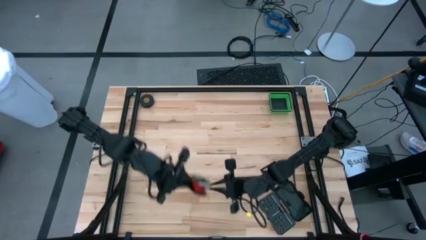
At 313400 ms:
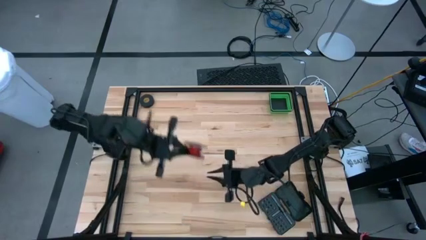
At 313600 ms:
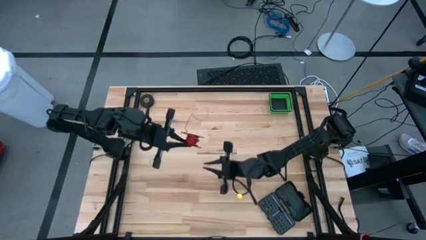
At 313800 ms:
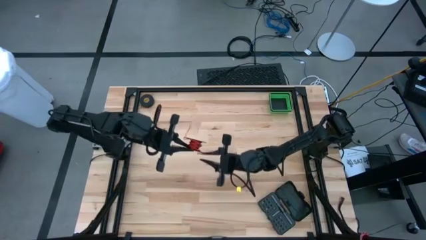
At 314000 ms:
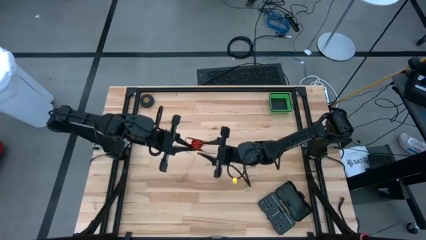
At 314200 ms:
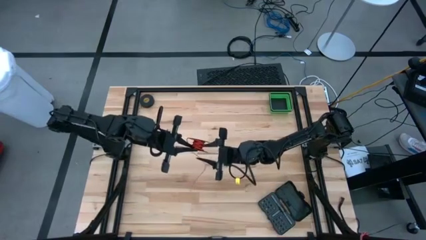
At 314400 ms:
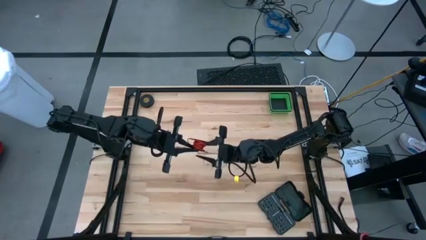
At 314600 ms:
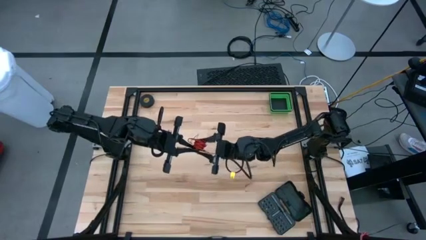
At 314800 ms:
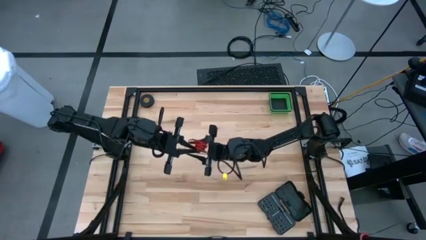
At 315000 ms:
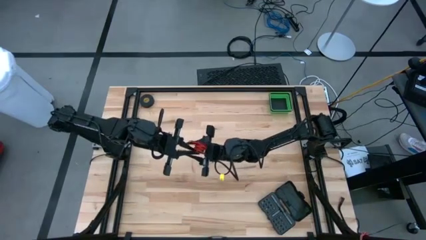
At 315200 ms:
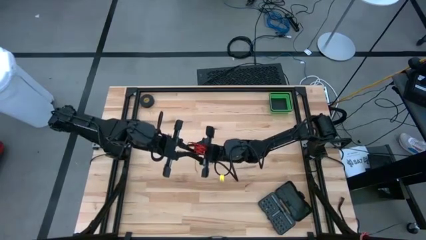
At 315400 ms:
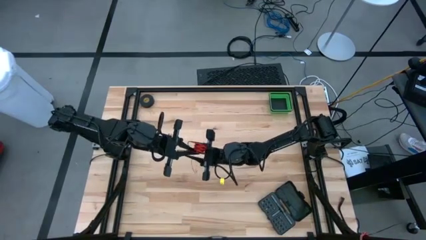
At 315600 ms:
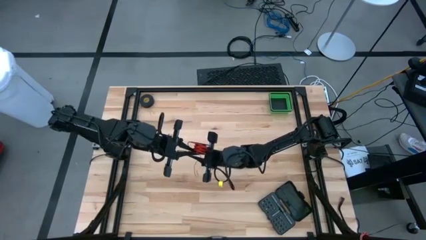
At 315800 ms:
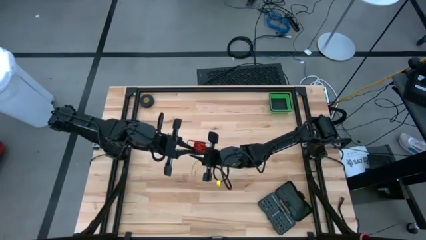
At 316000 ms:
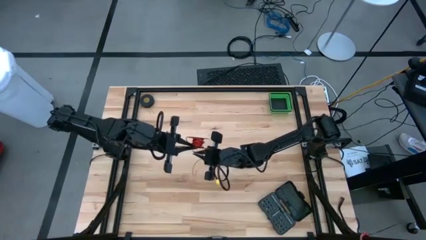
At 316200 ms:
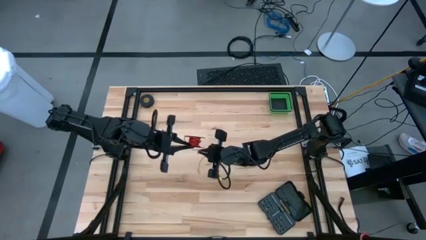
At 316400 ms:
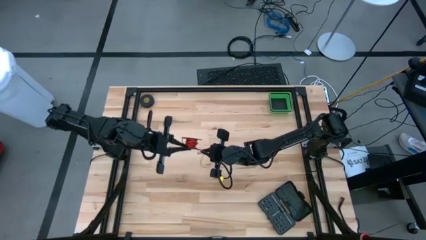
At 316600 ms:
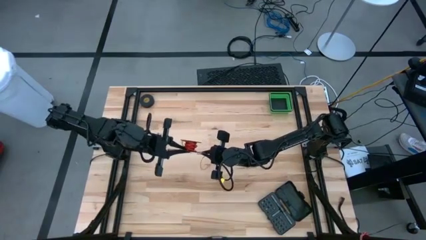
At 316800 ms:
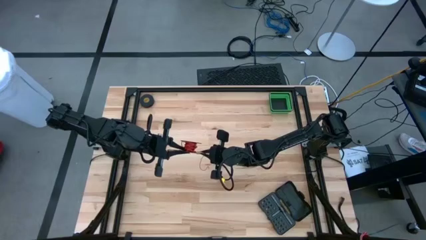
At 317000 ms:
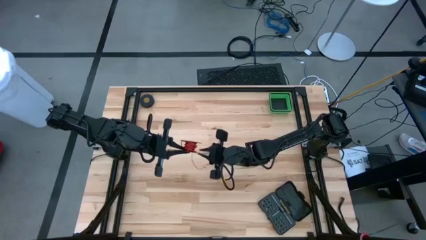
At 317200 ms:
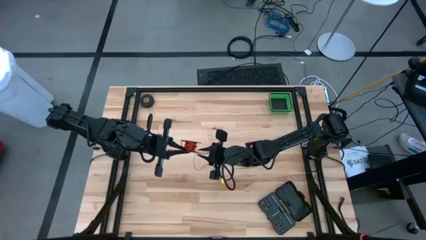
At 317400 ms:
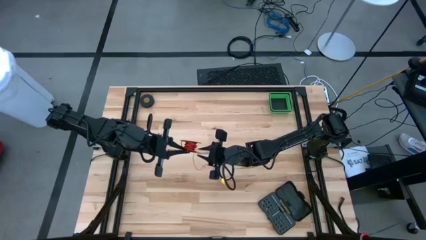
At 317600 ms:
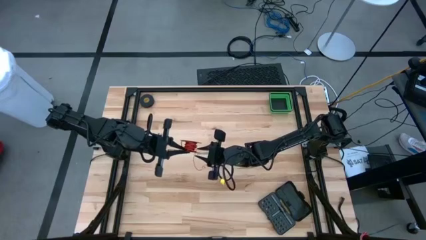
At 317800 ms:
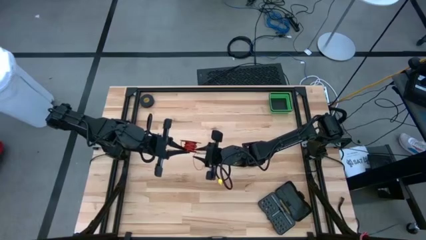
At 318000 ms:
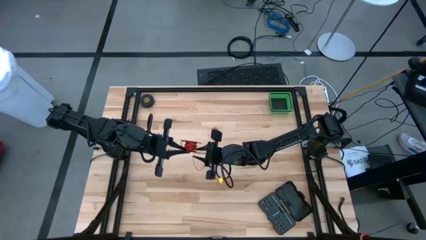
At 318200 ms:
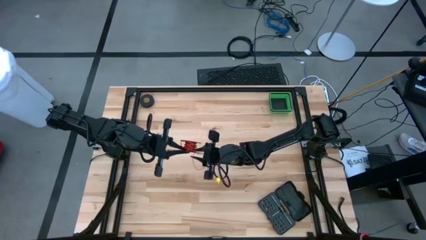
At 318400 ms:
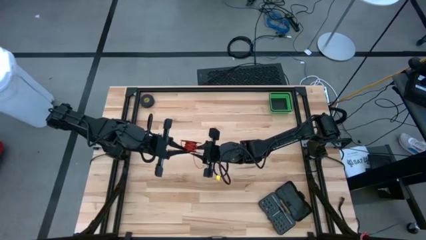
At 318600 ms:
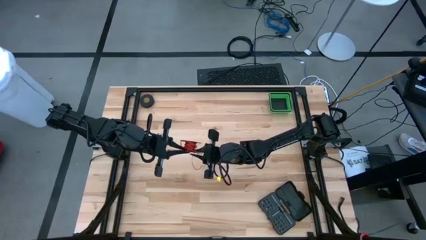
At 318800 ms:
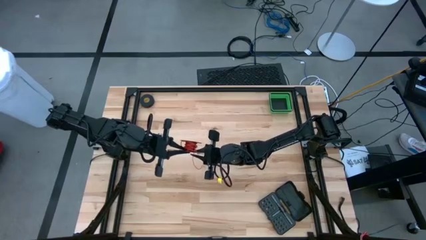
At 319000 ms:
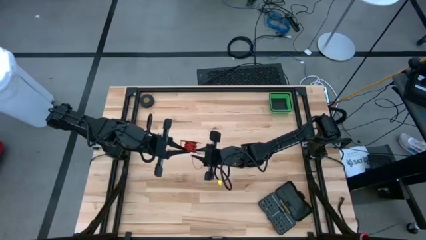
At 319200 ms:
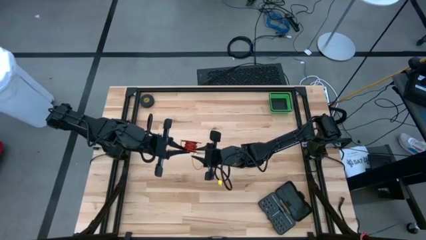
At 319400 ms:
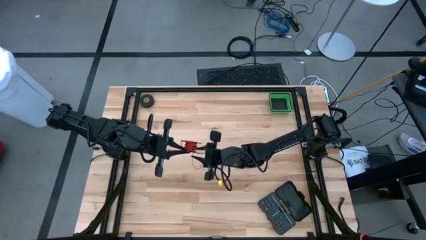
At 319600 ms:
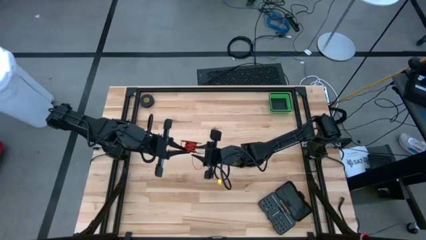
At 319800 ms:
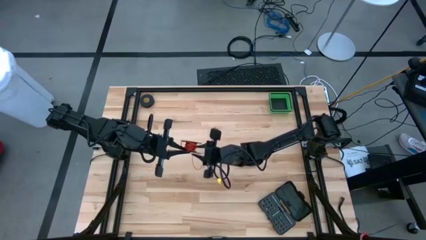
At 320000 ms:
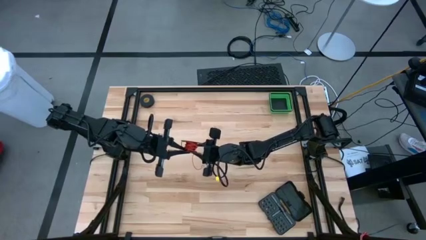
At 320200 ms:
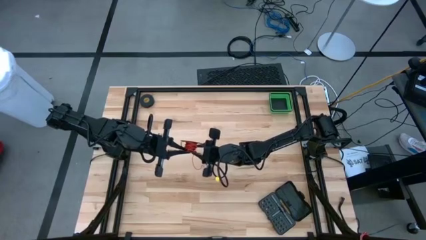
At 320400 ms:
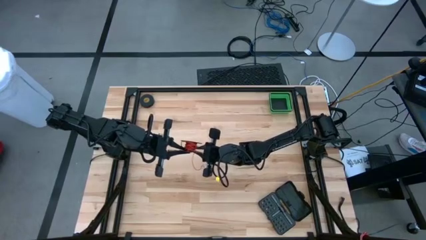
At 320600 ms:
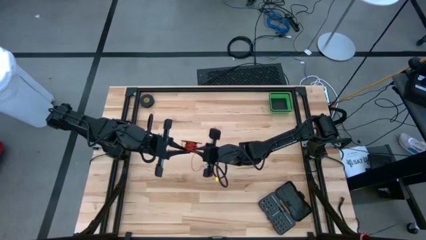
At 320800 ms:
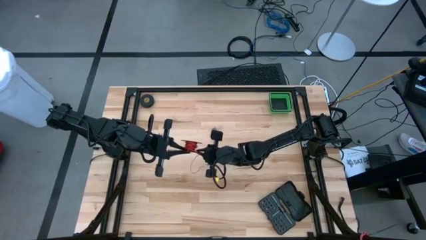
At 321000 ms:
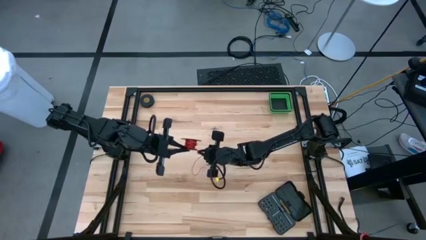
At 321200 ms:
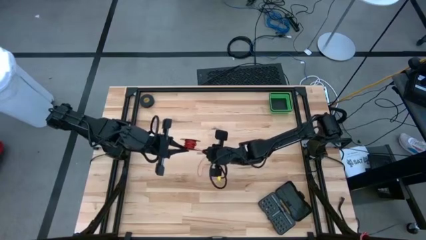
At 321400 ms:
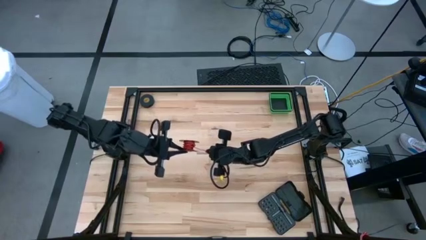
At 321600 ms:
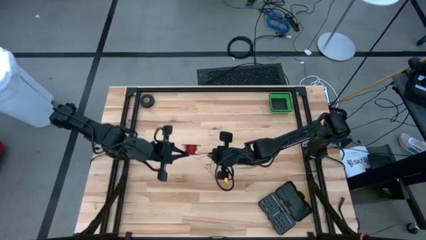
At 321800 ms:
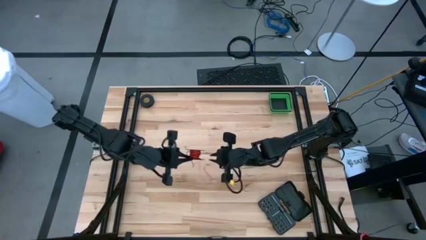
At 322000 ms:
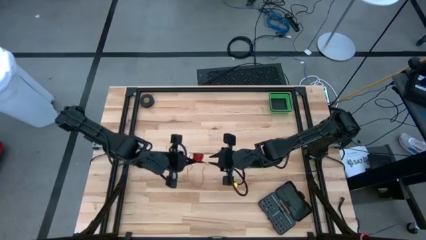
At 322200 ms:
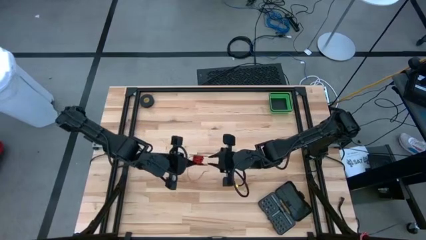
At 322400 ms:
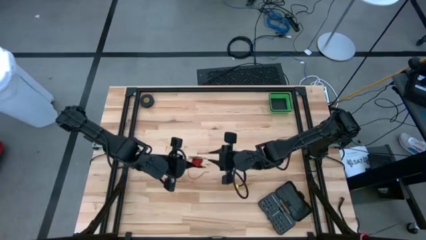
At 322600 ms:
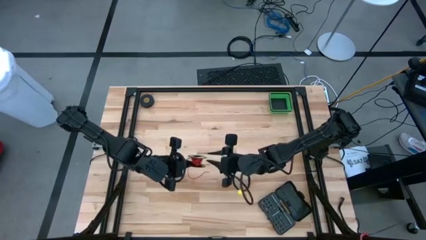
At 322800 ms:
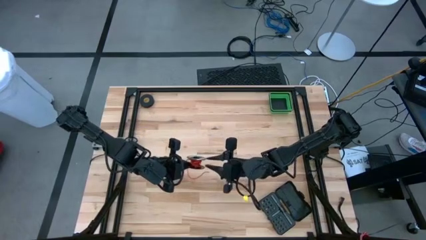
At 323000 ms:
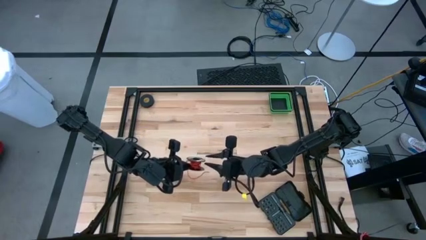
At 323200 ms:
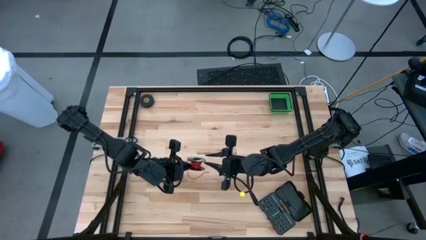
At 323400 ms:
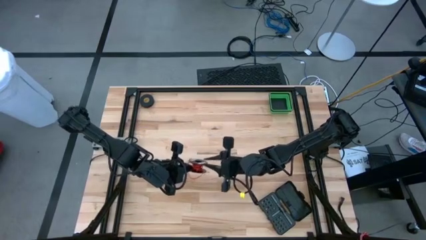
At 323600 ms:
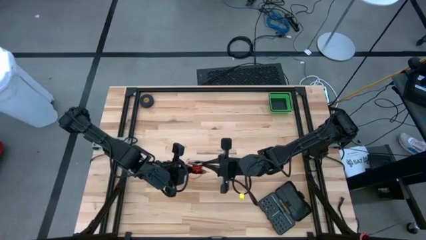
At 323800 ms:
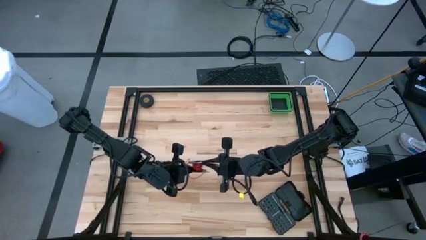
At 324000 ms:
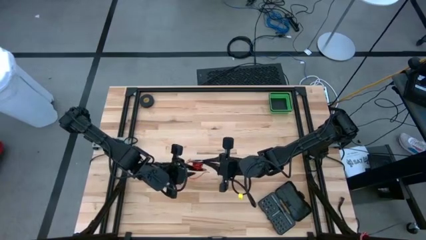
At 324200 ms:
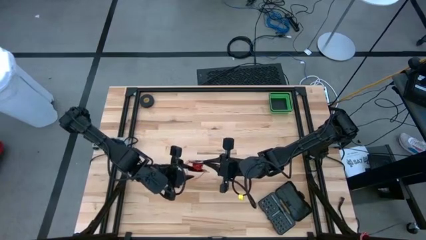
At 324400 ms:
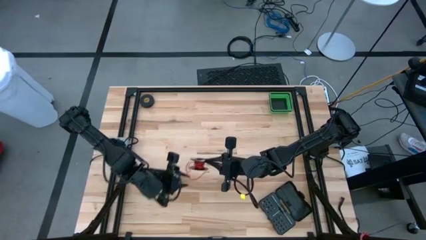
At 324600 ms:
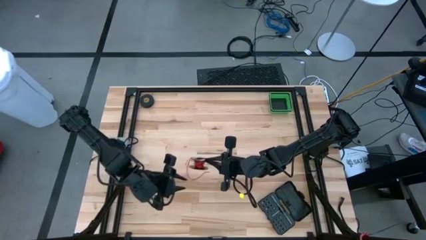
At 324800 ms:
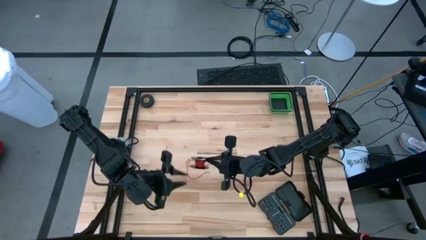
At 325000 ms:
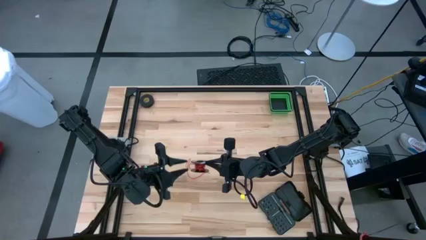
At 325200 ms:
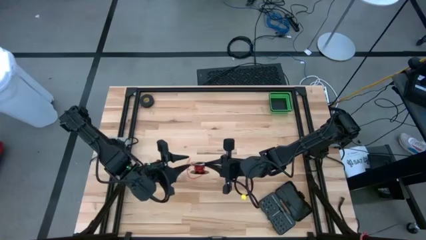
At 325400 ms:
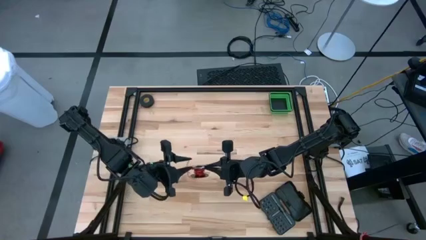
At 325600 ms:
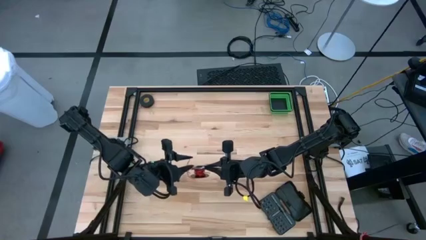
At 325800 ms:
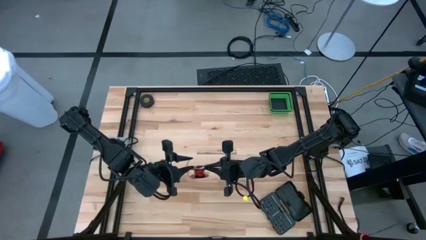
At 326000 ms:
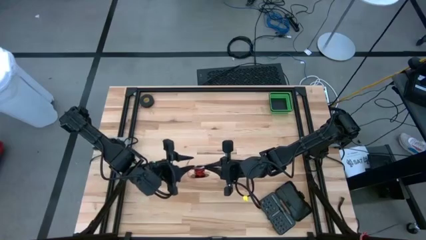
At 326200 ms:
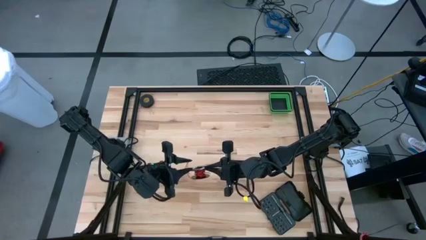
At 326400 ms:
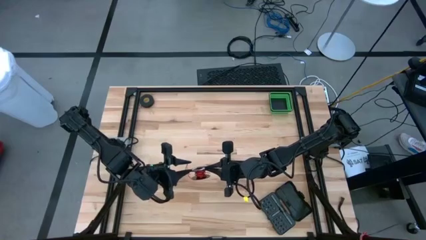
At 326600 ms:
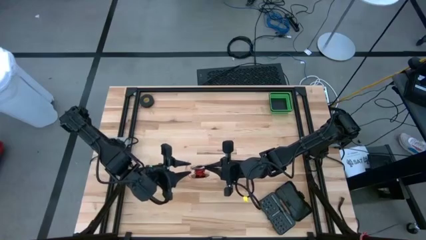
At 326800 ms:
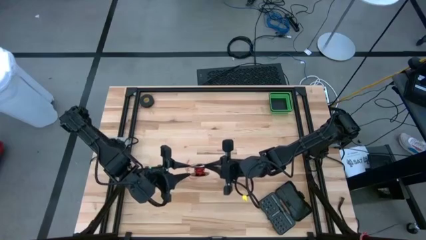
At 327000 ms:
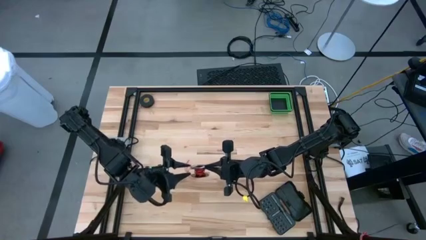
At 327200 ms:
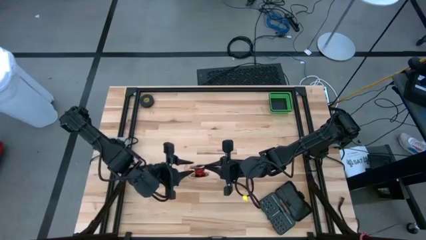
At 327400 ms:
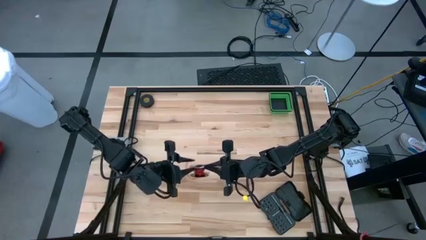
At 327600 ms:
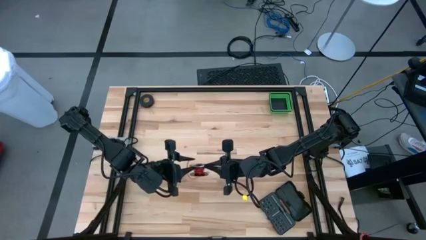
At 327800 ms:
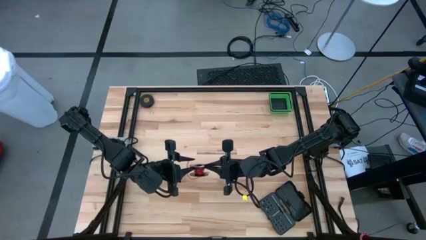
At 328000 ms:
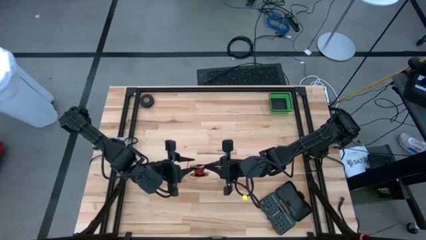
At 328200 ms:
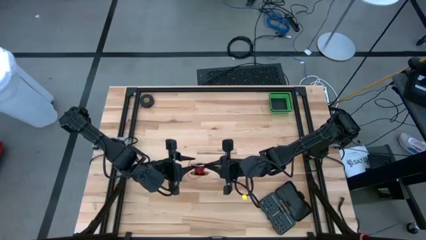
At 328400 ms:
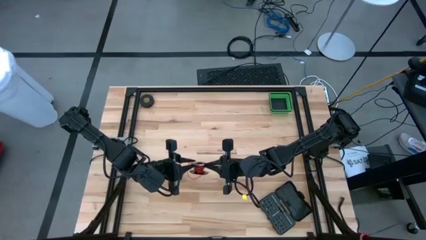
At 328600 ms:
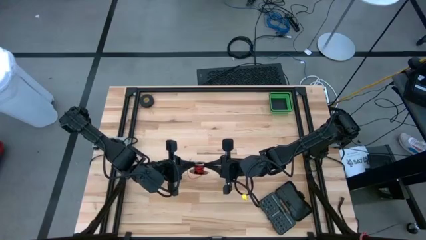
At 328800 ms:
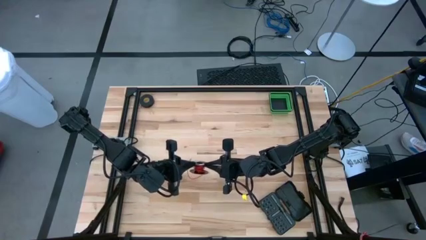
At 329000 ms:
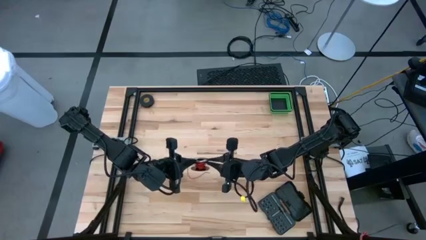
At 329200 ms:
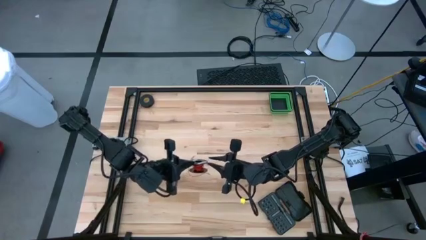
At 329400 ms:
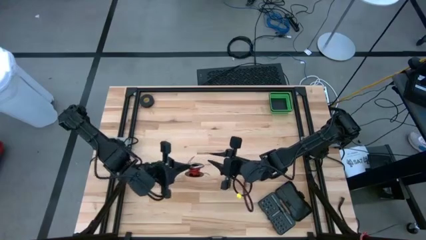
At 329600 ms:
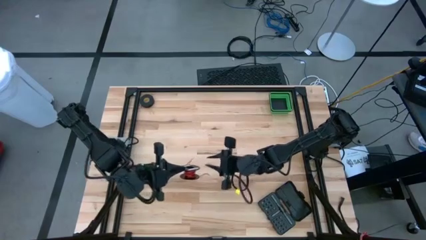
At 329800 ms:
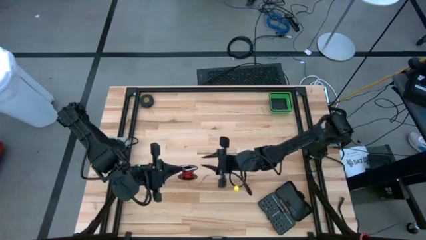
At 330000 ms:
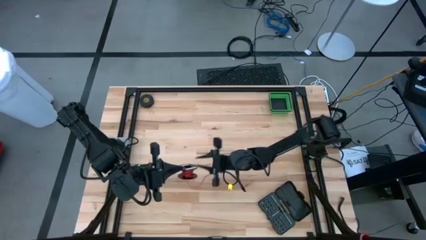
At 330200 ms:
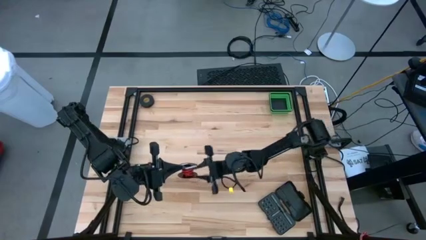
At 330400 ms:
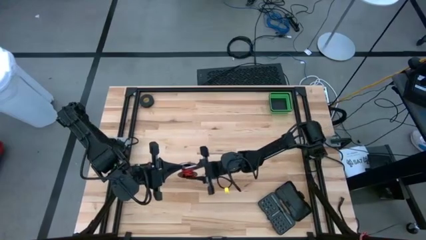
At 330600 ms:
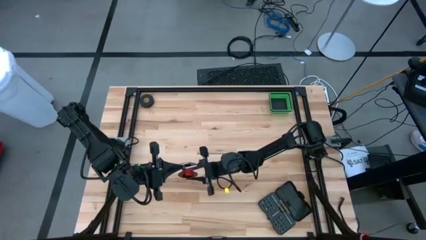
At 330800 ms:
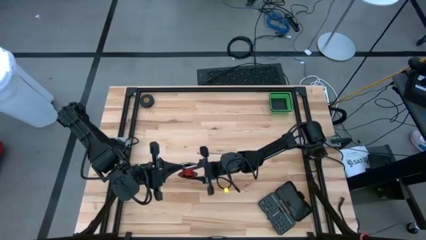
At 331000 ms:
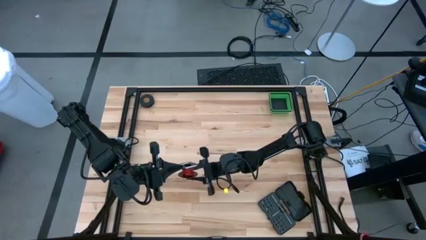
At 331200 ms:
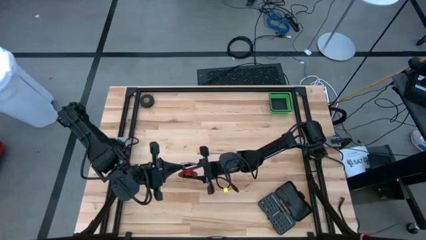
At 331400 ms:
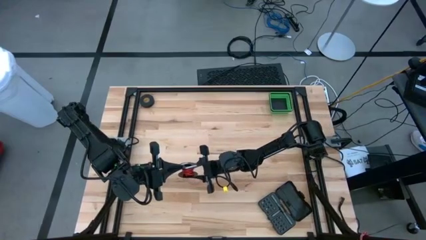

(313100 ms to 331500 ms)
Task: Coil cords
Coil the red wire on the black spool
